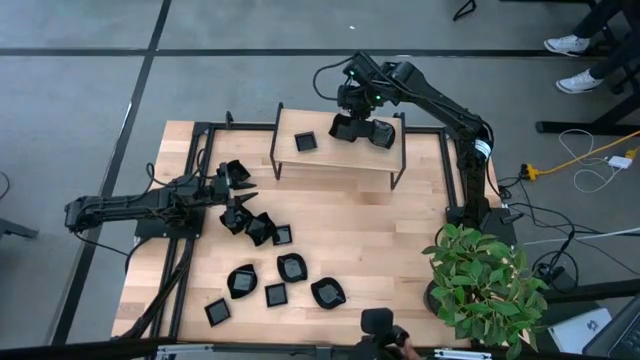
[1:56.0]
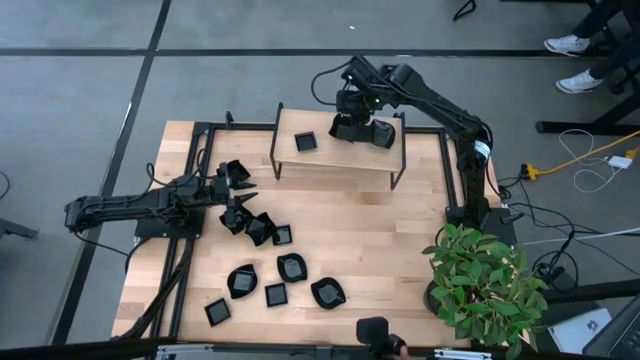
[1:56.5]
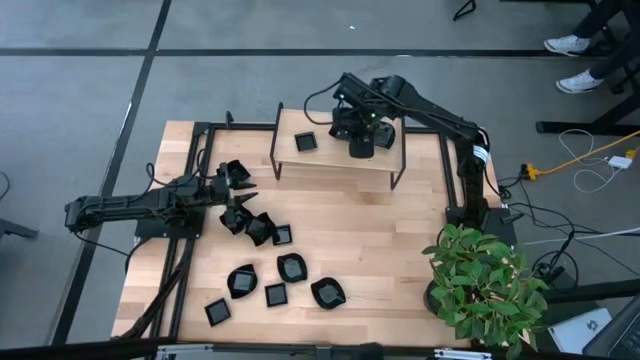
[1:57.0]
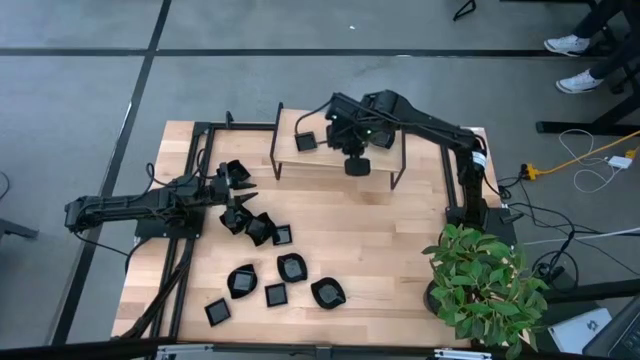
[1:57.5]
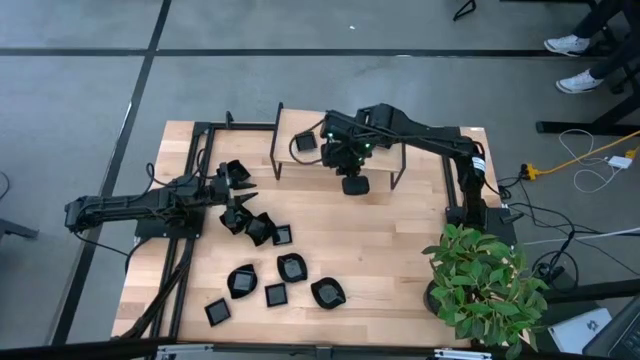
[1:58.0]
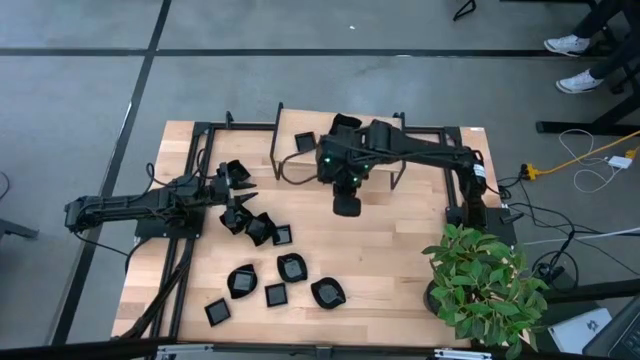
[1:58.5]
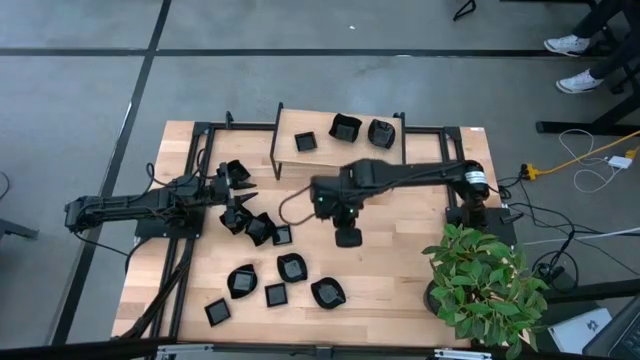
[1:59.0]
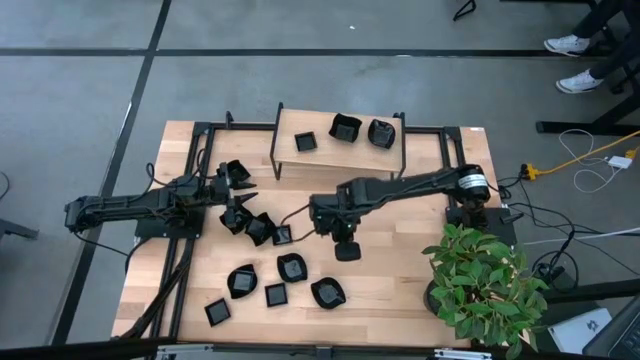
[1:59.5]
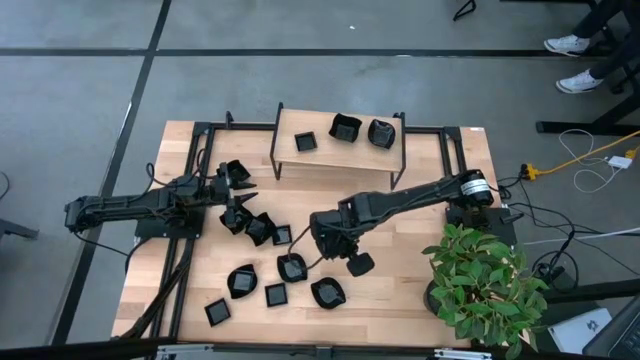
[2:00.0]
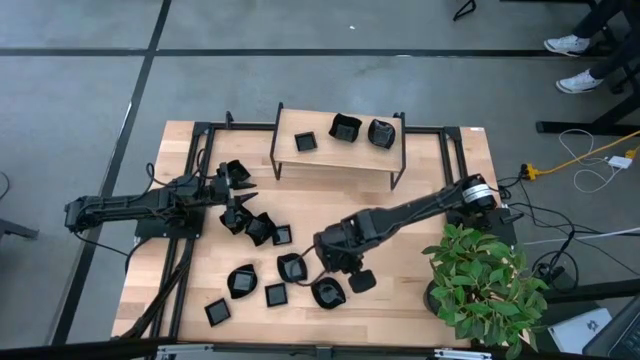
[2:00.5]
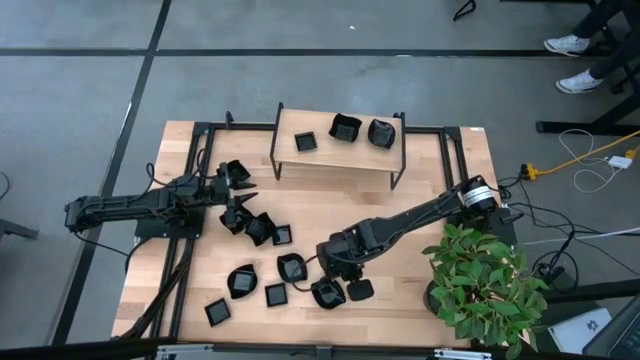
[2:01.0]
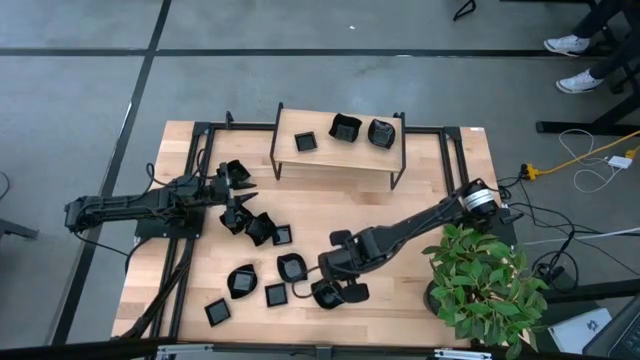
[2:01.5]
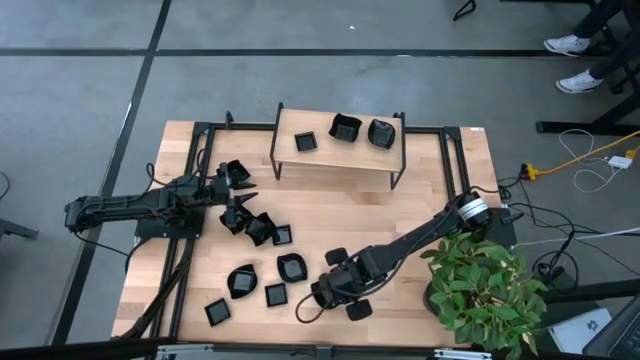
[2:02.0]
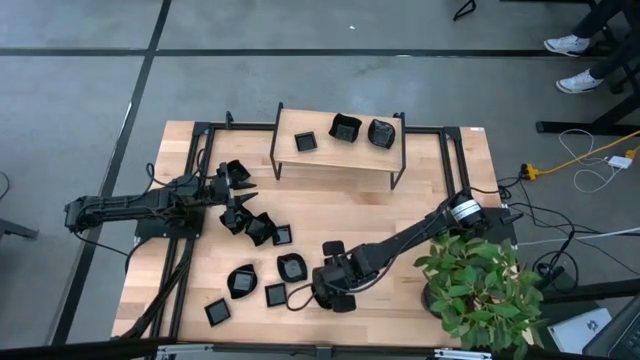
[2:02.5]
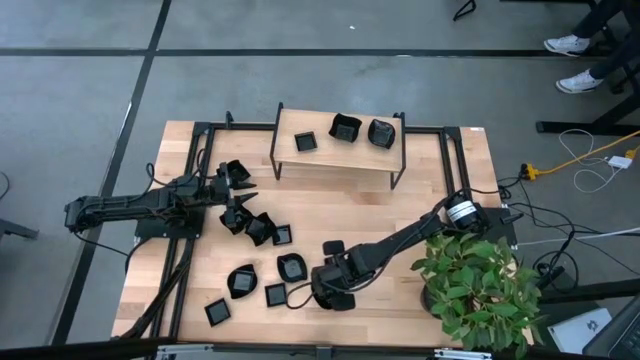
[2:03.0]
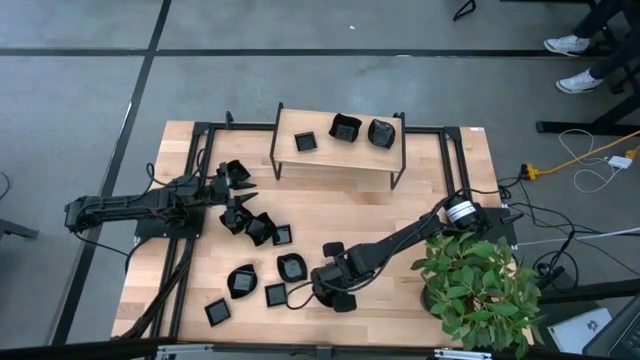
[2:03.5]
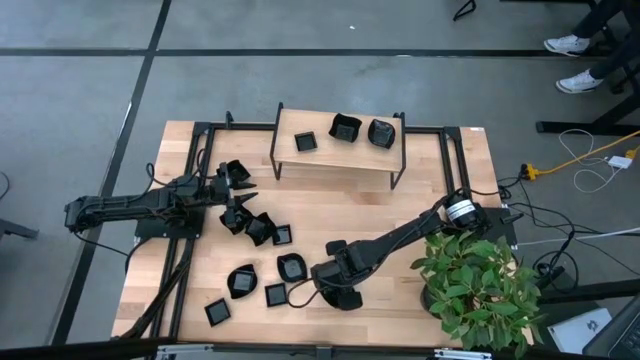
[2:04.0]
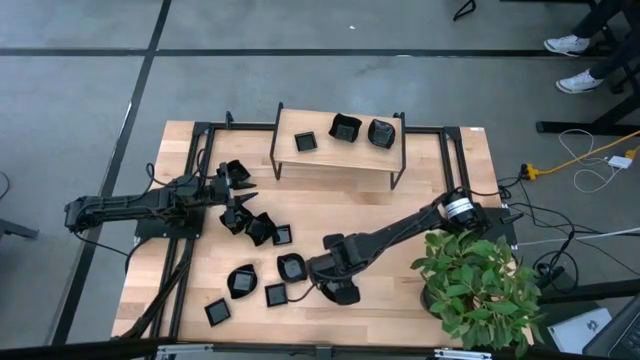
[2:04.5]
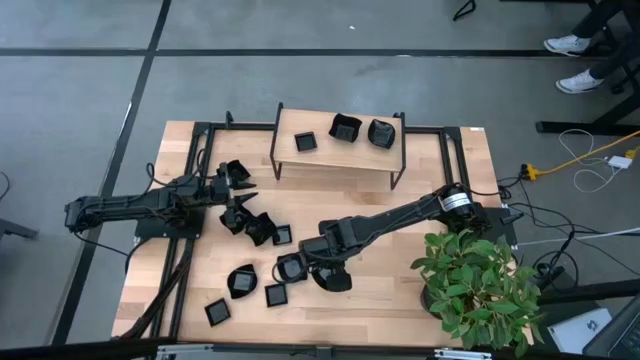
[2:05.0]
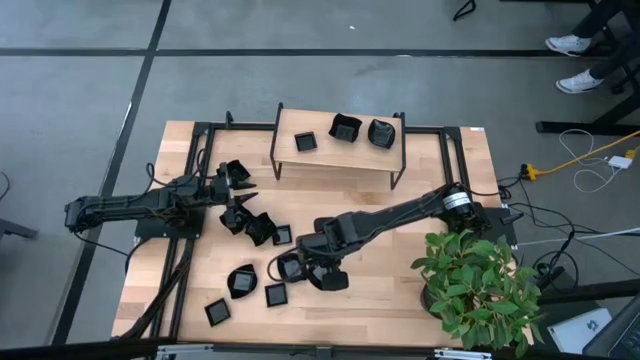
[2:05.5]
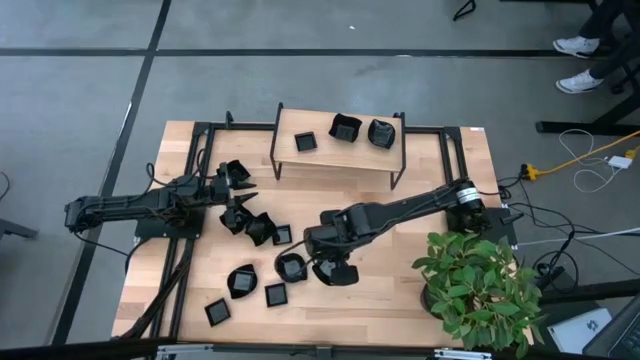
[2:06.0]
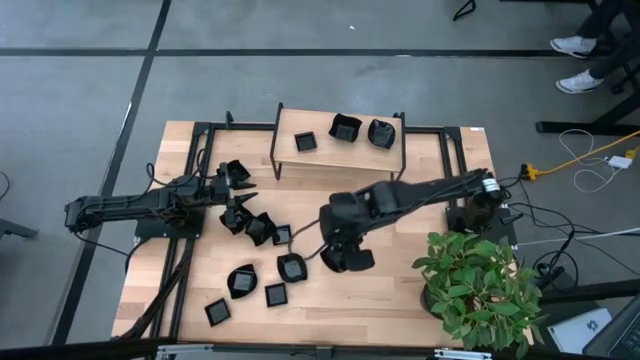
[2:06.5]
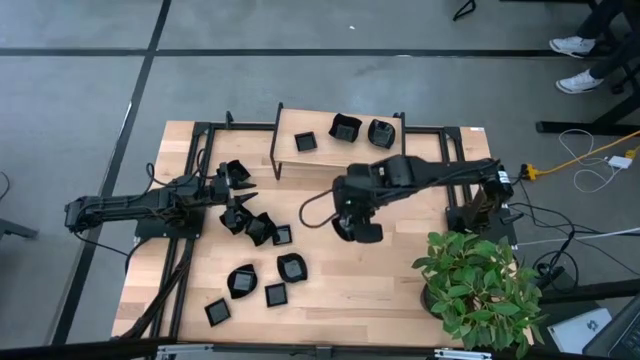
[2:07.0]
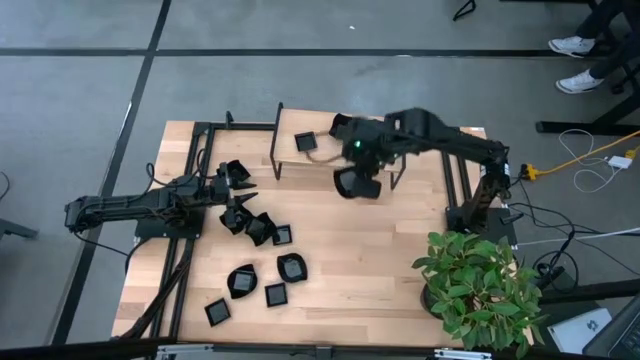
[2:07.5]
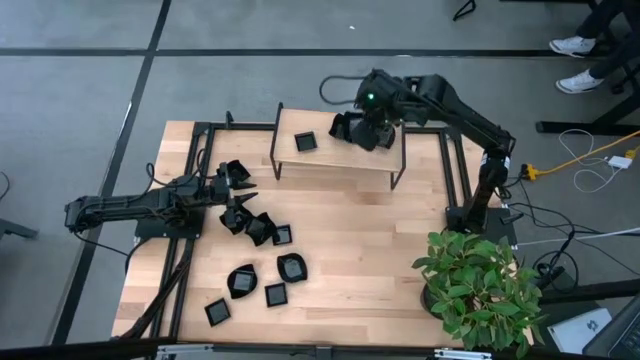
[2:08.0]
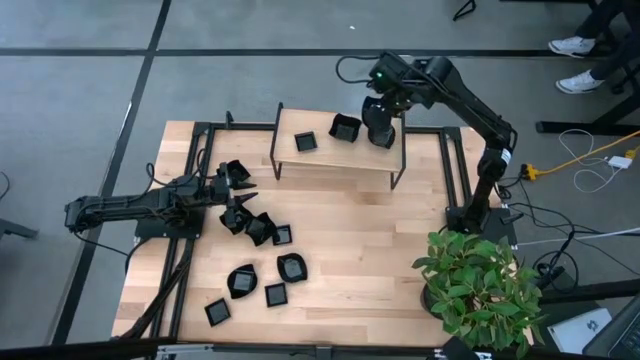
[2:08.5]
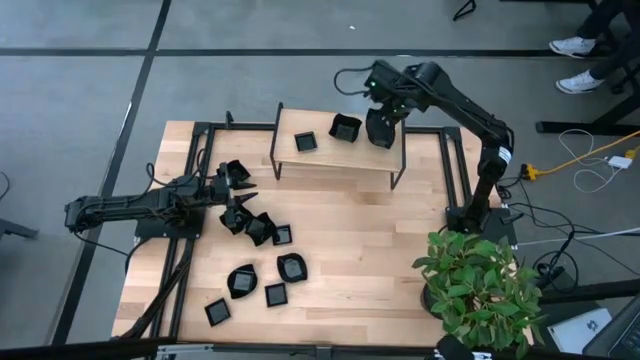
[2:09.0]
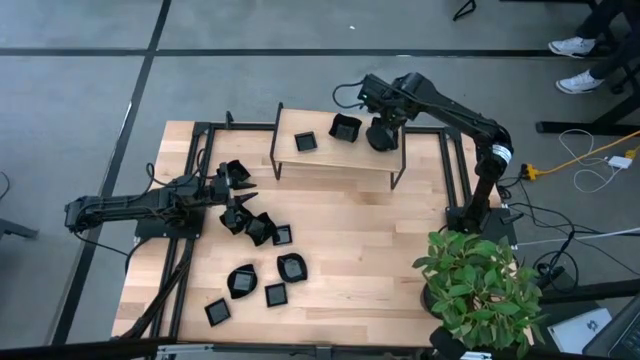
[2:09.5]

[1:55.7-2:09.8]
Task: Pick & Place Mini shaped plates
Stack the leaf-shaped plate on top of the leaf-shaped plate on the shelf

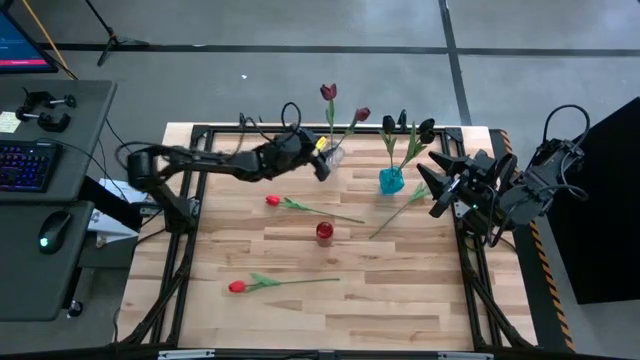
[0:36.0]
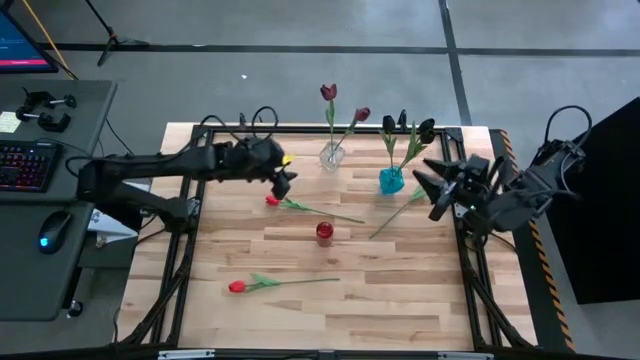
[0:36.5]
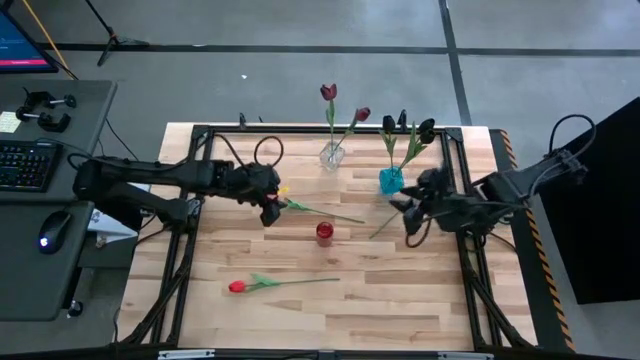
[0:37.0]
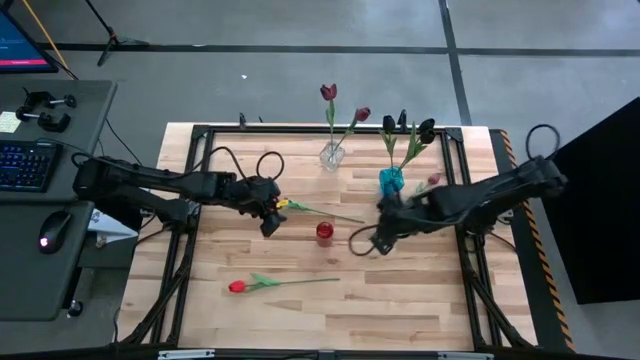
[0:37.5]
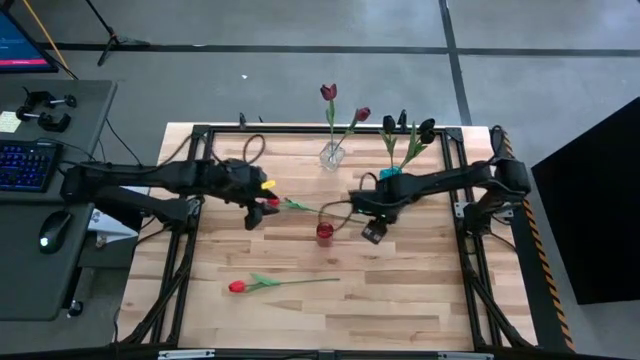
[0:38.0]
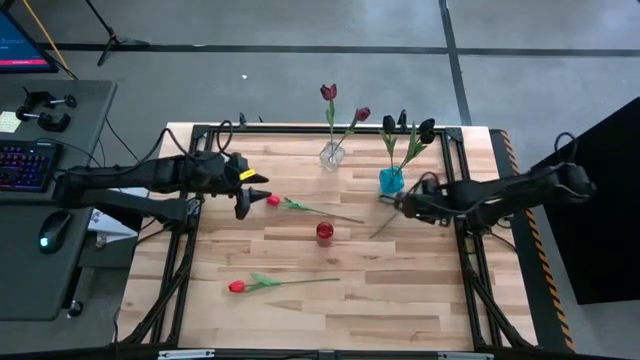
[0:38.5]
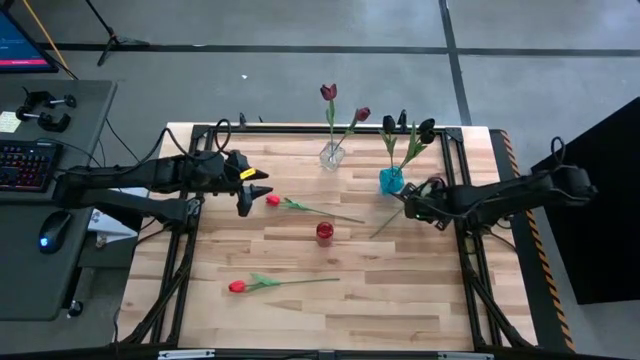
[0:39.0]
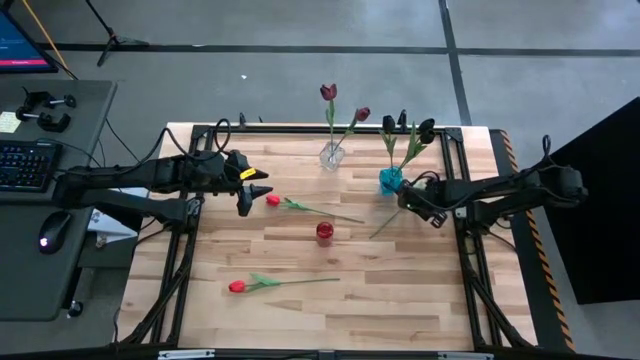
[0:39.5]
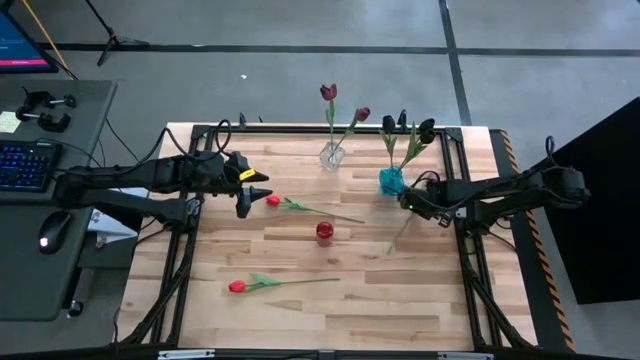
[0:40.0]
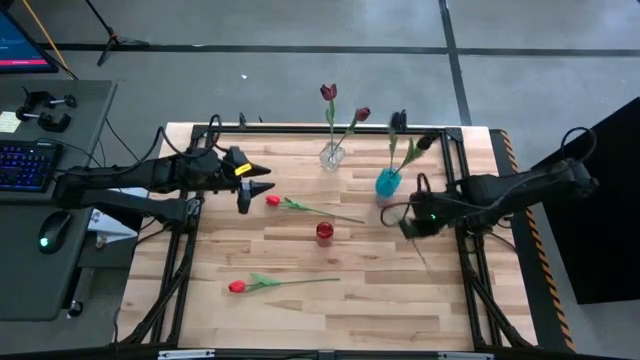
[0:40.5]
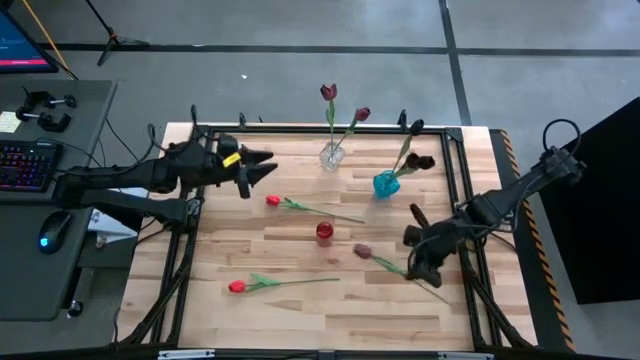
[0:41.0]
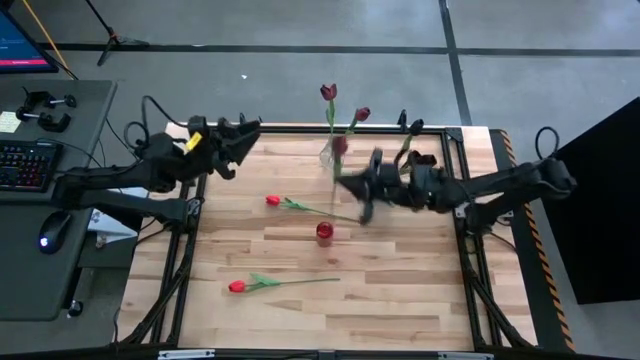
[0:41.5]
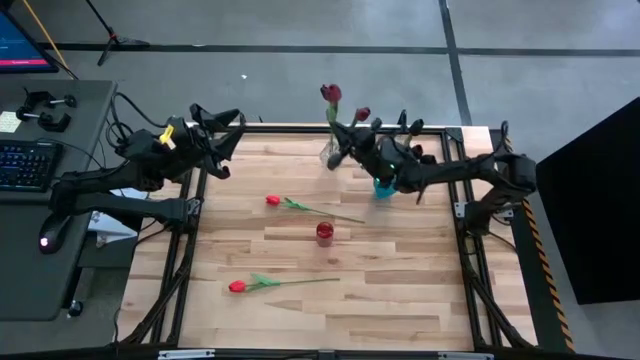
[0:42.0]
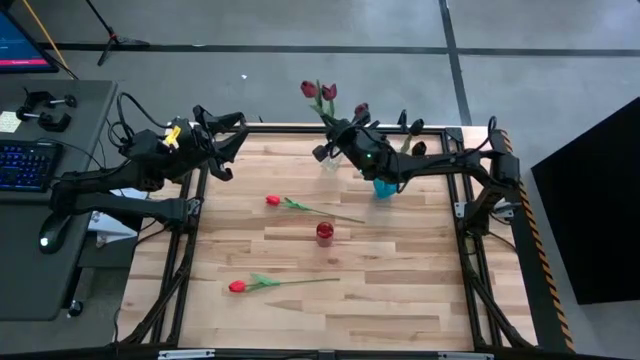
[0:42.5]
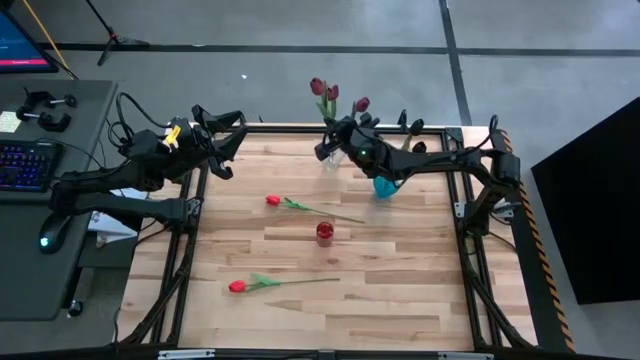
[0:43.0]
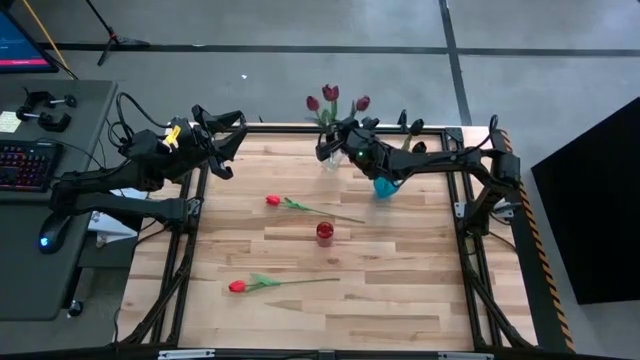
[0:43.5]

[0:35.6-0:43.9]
Task: Sort flowers into vase by color
Put the dark red flower into the transparent vase
